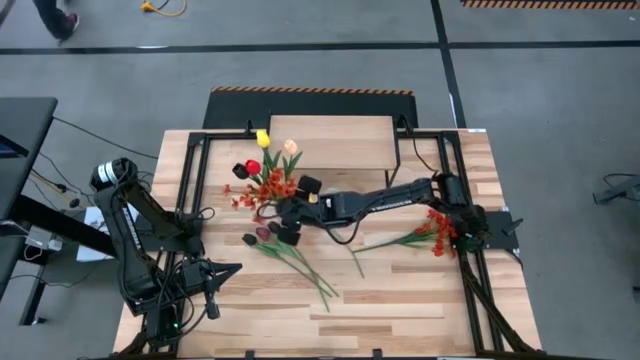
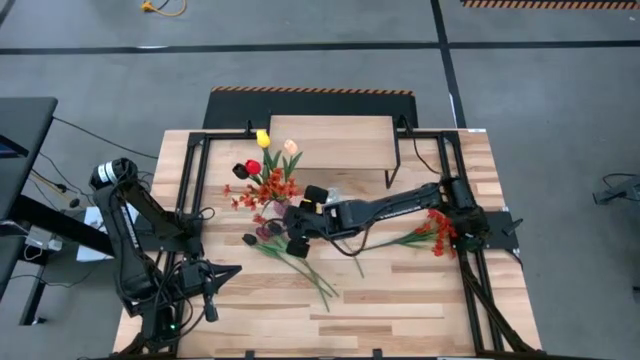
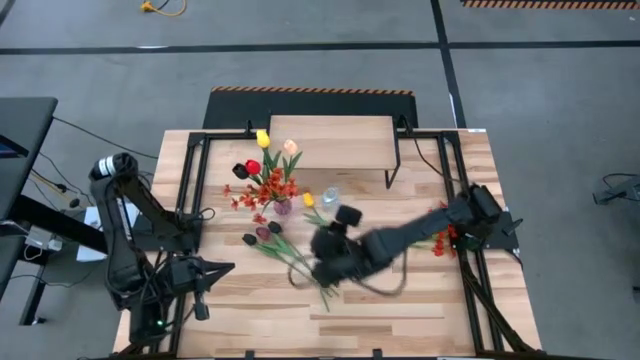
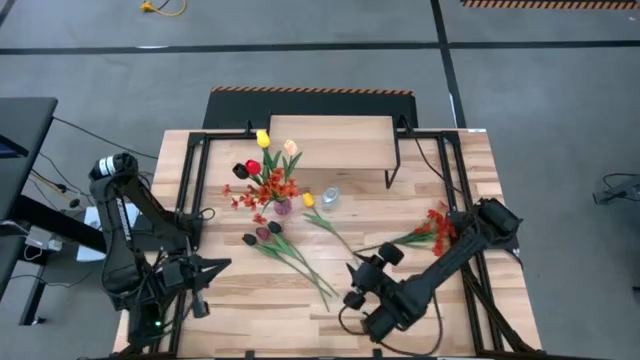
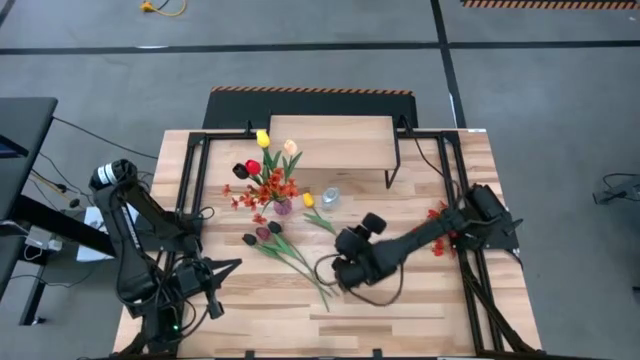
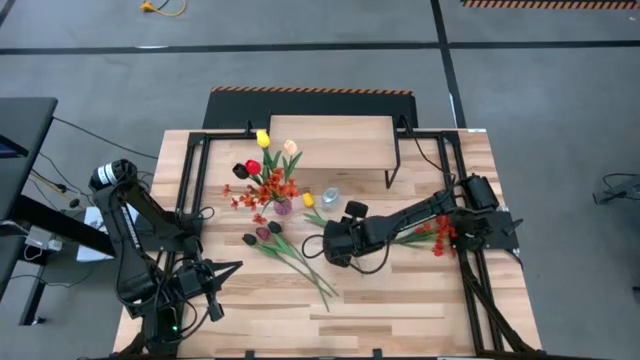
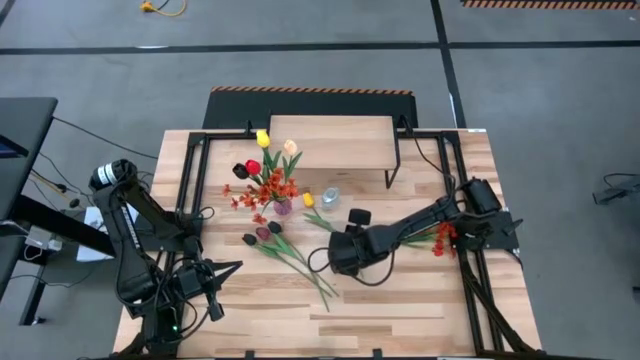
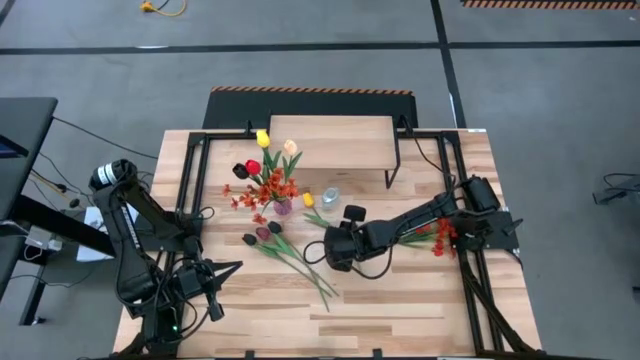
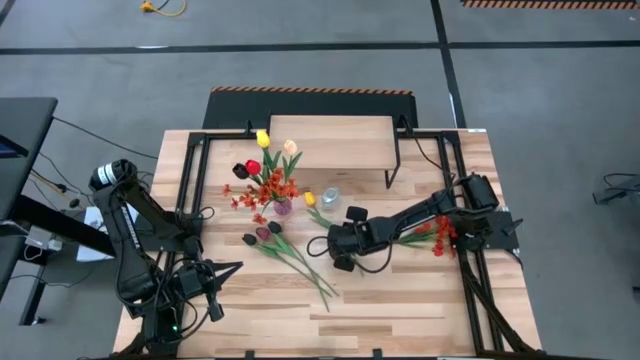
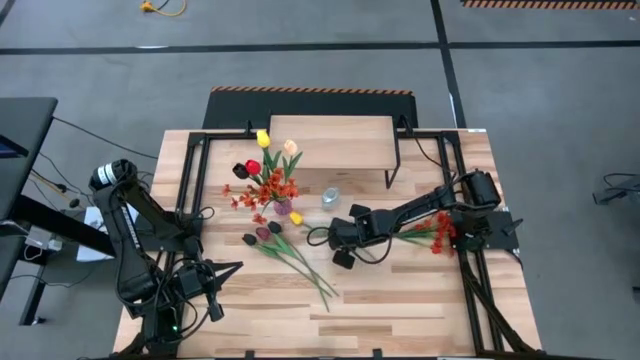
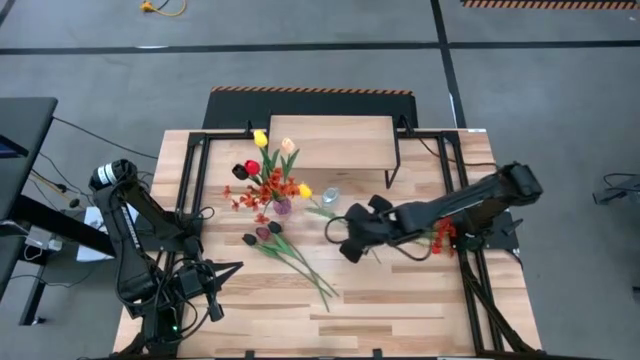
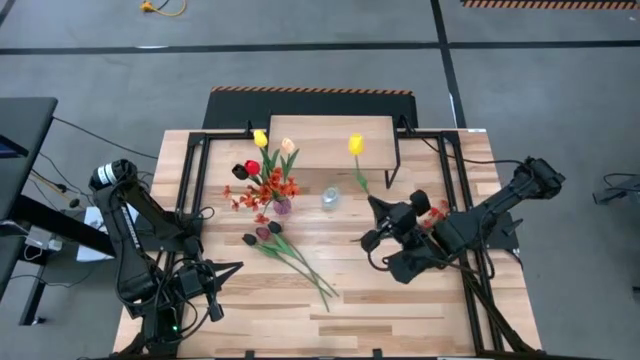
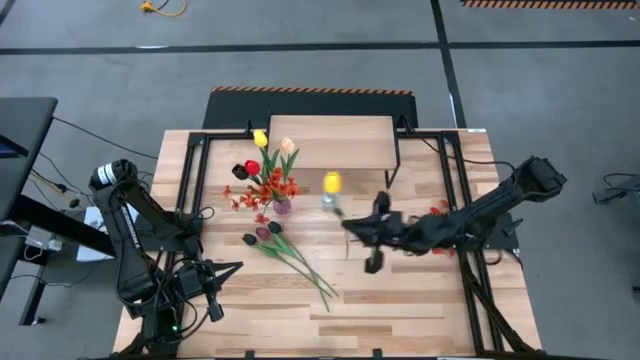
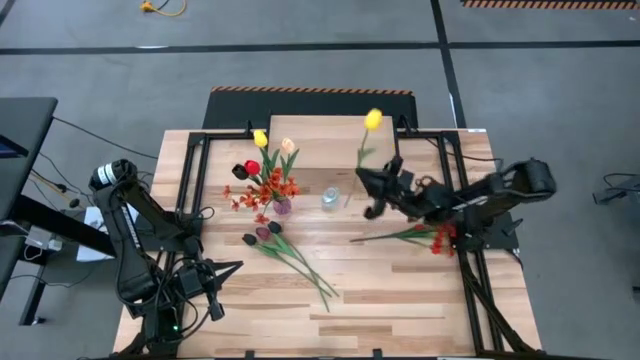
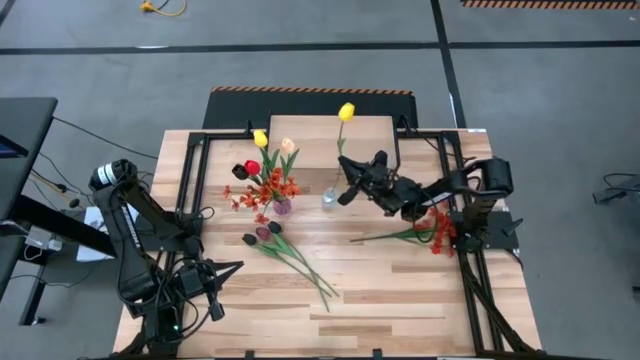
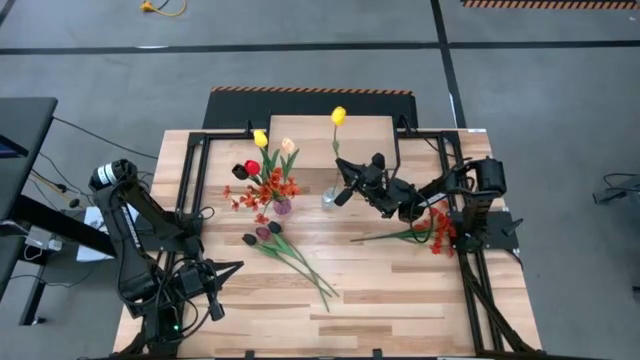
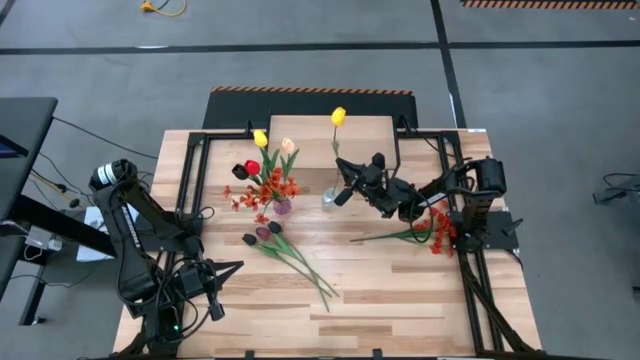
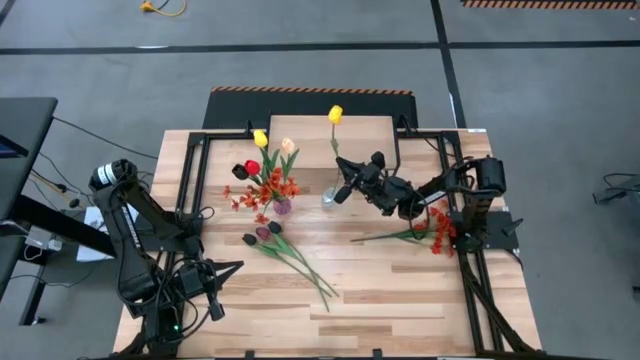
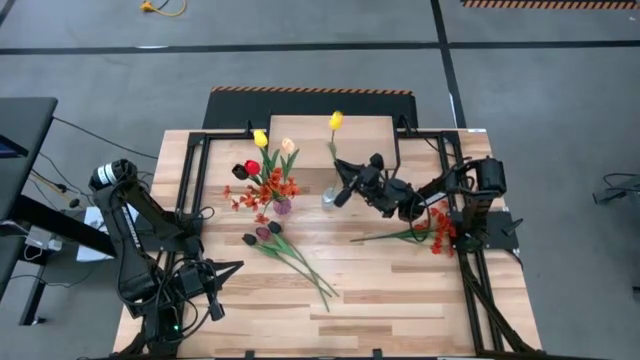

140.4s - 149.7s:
Task: Pick and place flowers into a vace then onto a shelf
Put the yellow tulip into the transparent vase

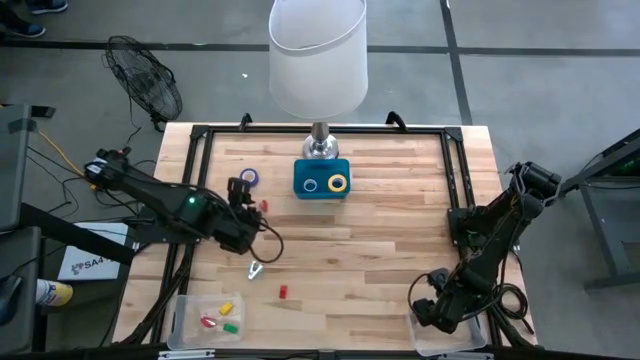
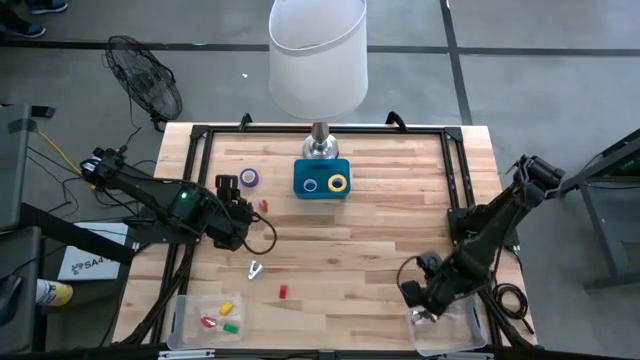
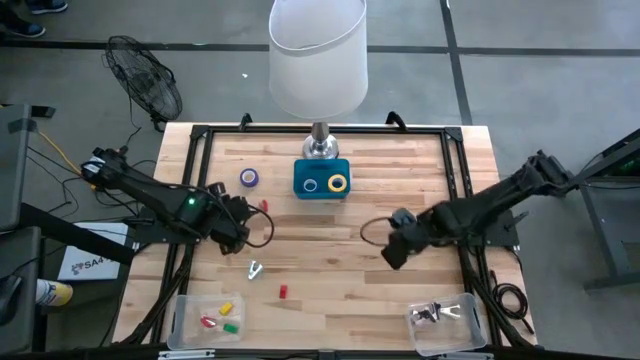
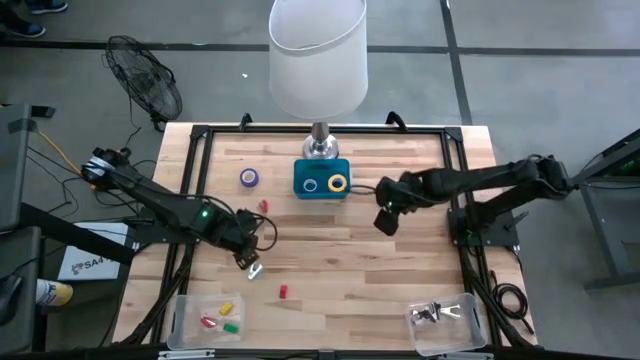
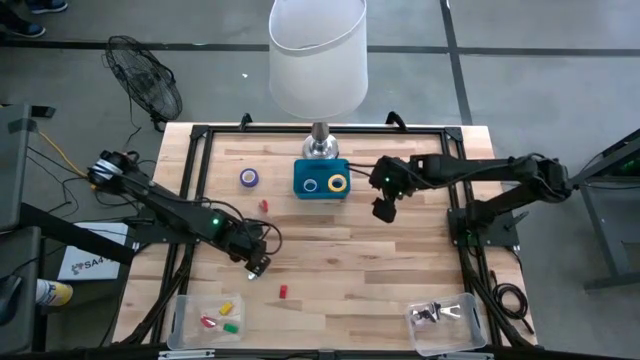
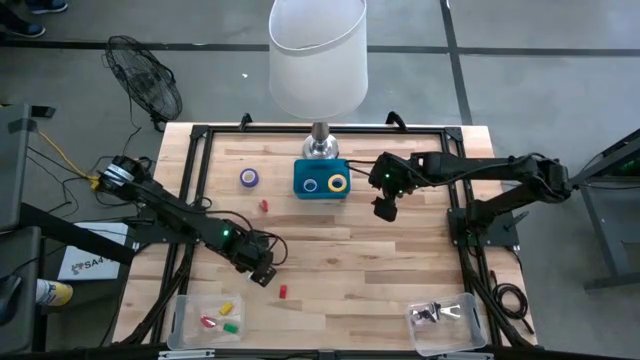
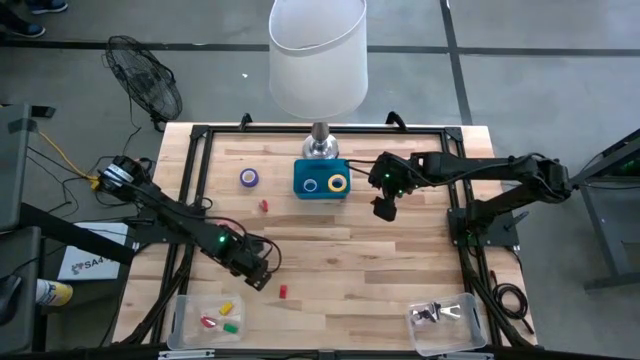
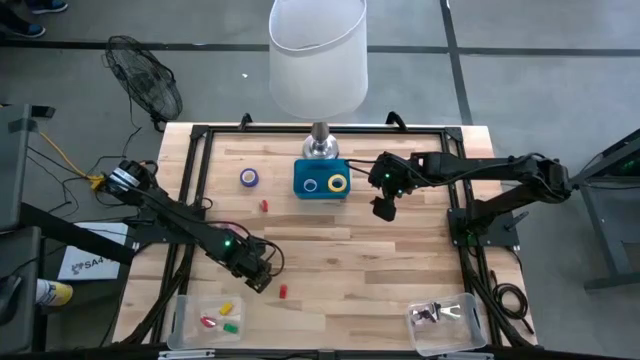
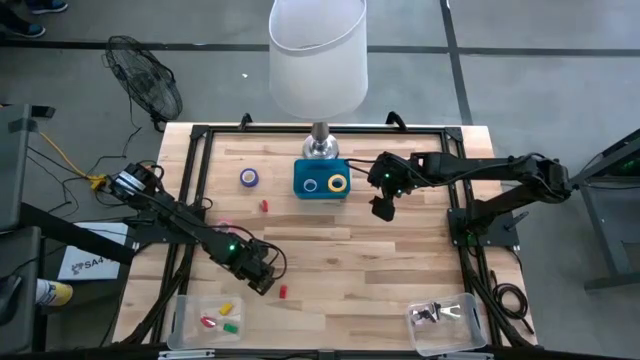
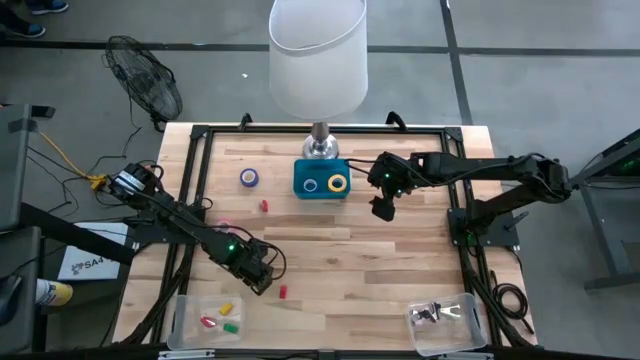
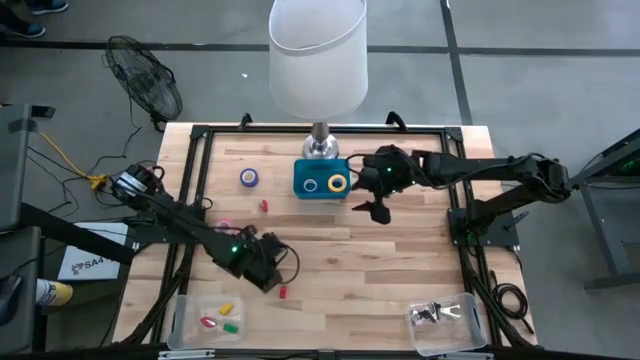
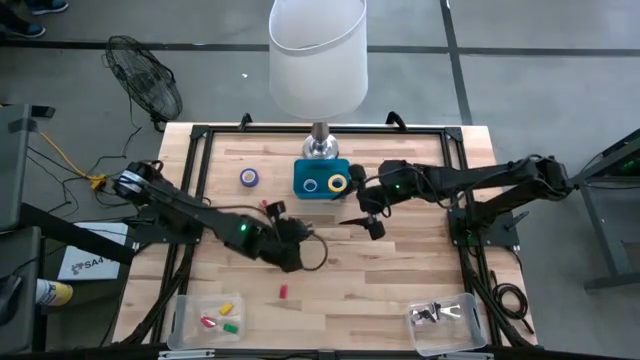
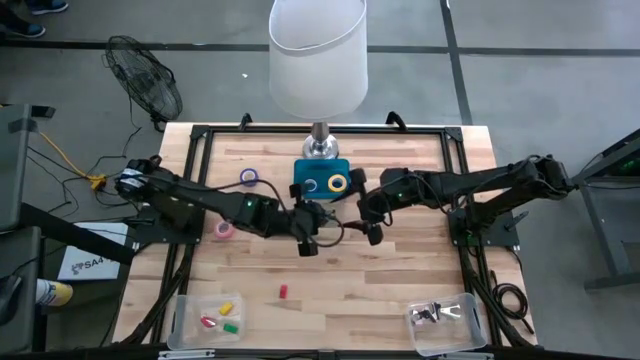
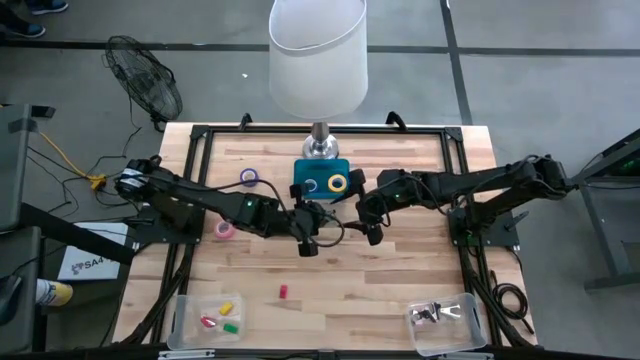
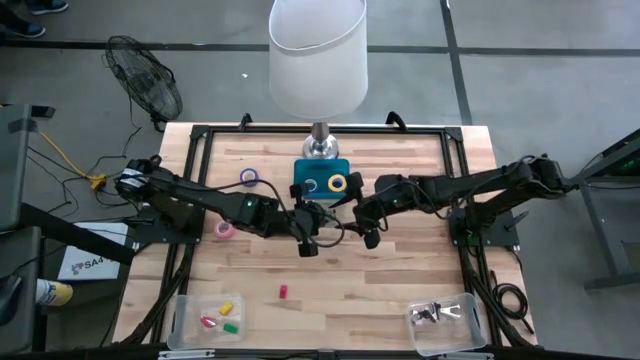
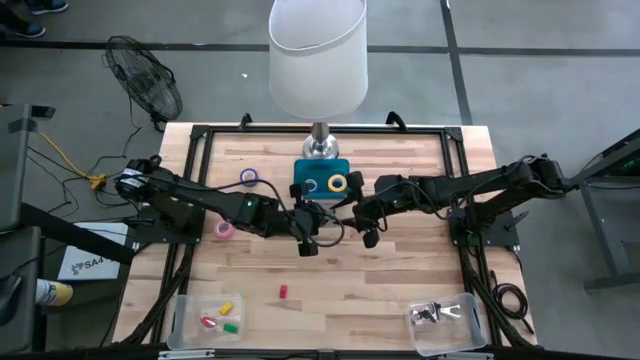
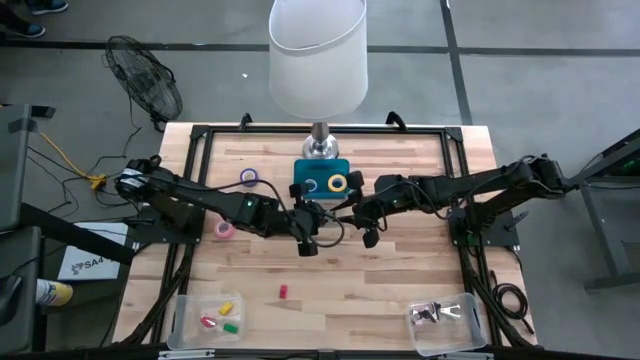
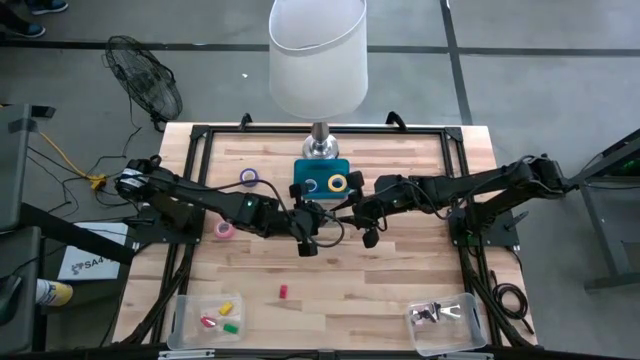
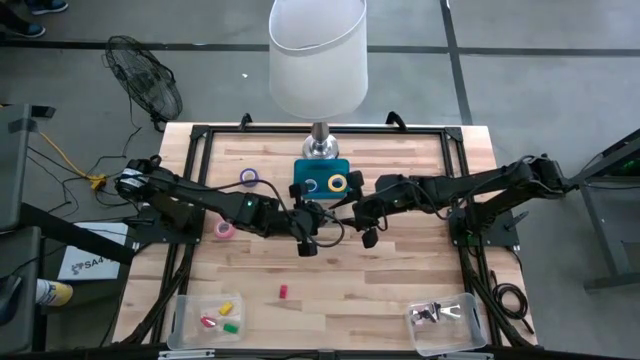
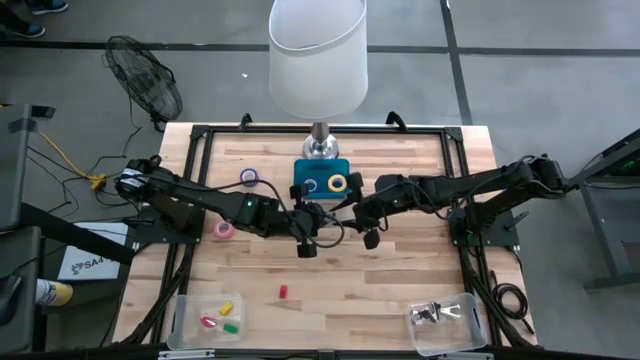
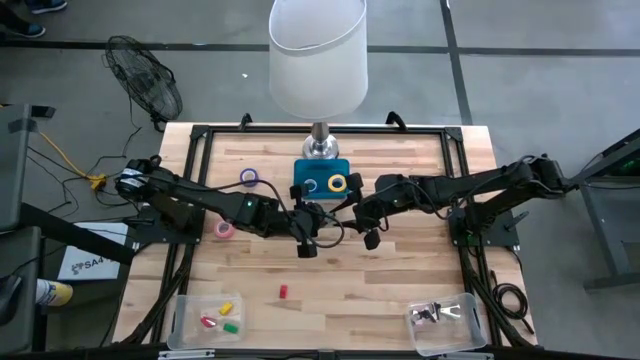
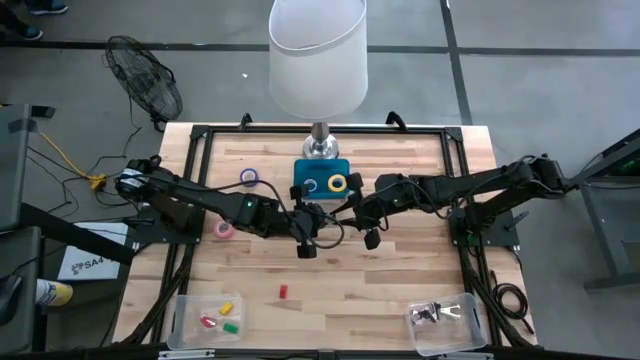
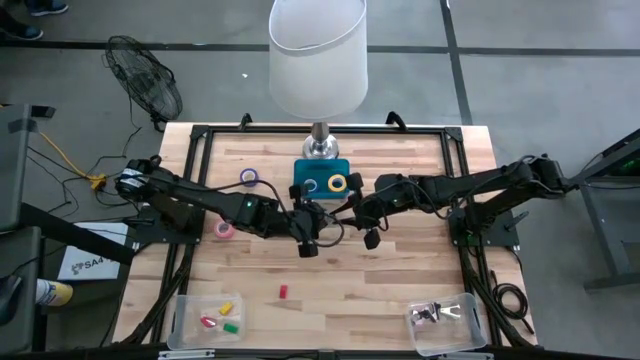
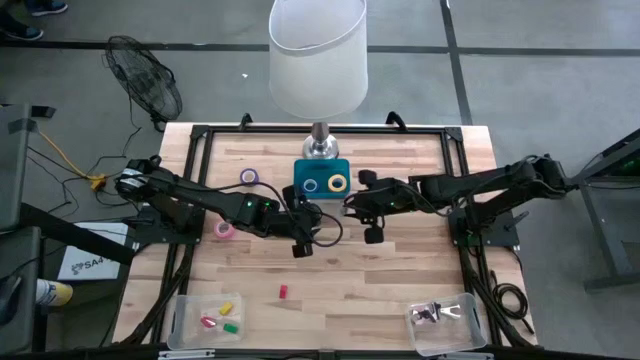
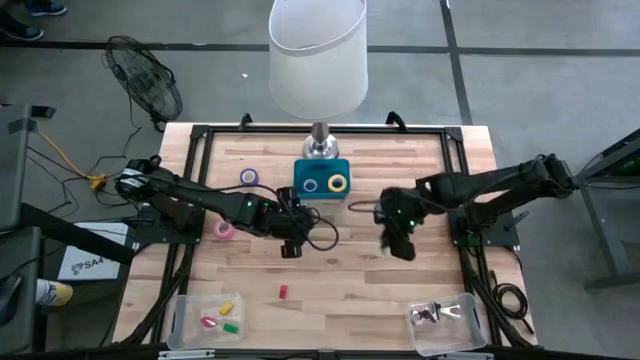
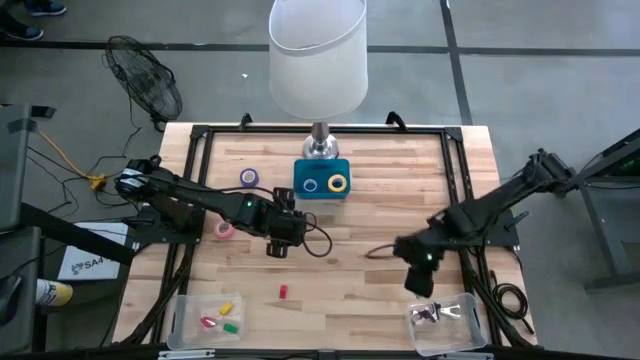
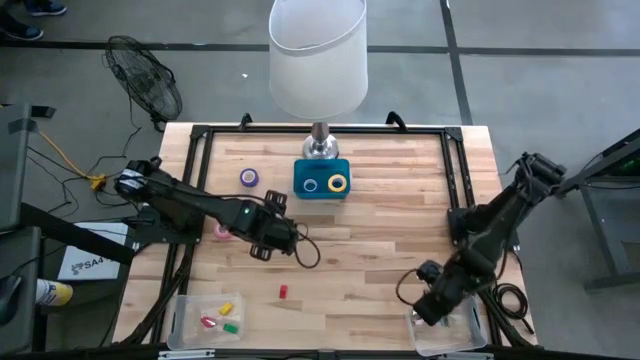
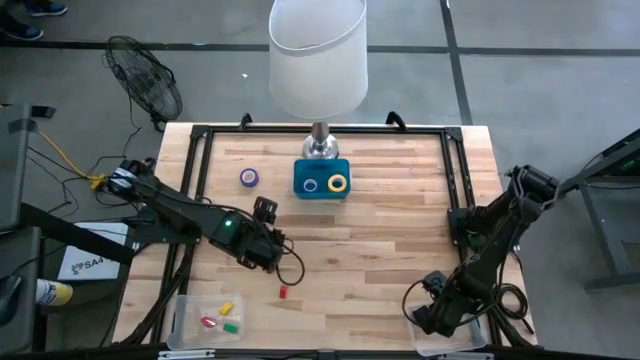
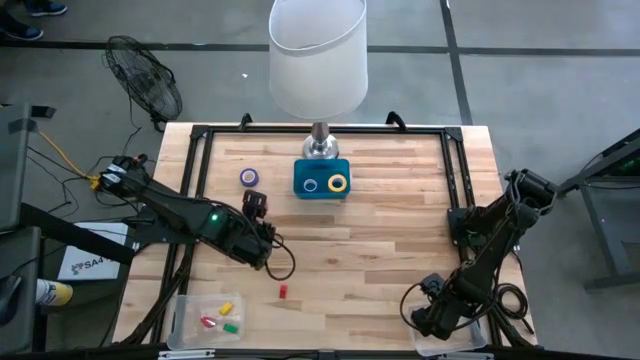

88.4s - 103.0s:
Task: Pick and place Stapler, Stapler remover, tape
Put the light blue staple remover into the right transparent bin
